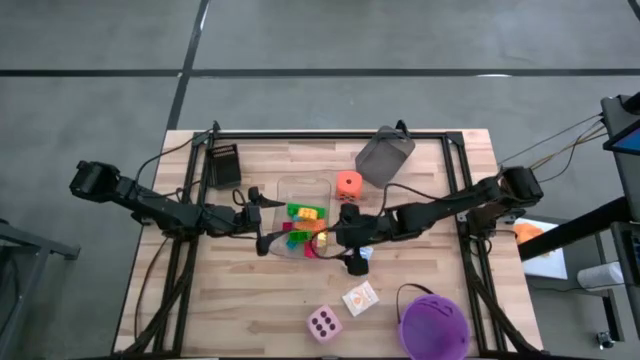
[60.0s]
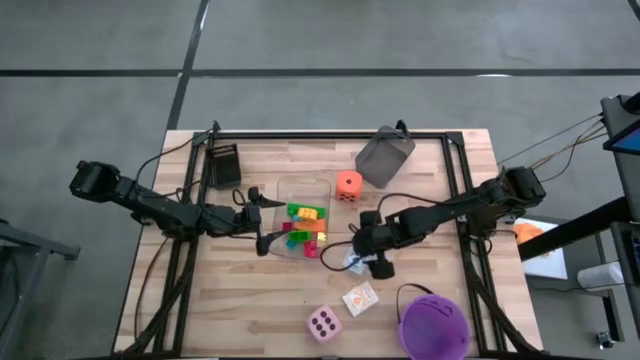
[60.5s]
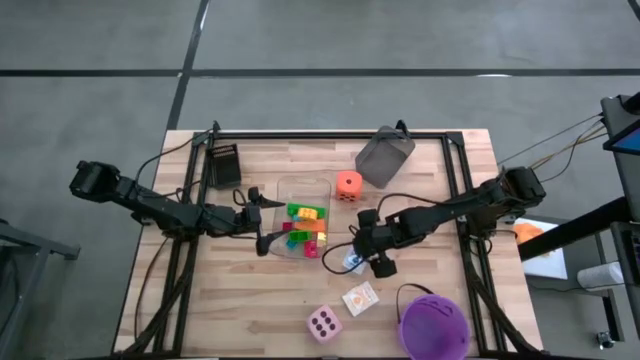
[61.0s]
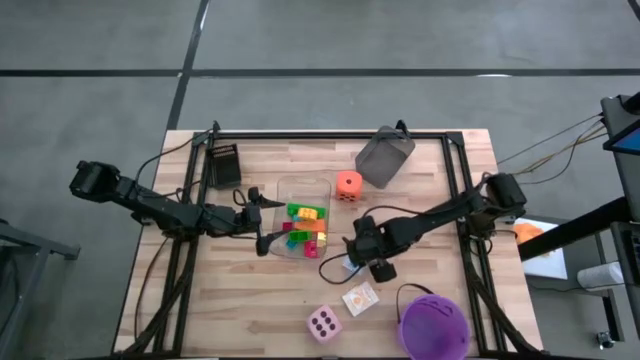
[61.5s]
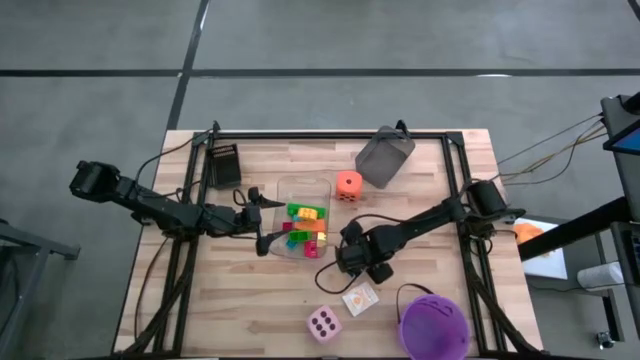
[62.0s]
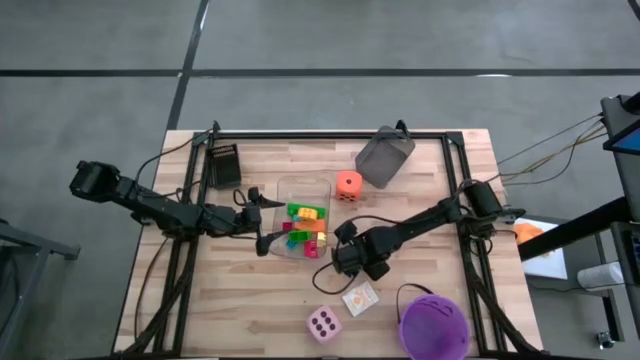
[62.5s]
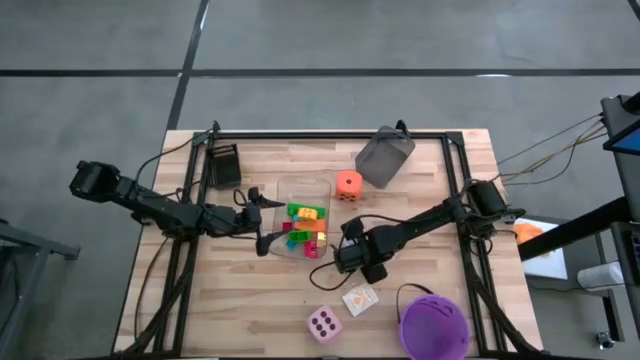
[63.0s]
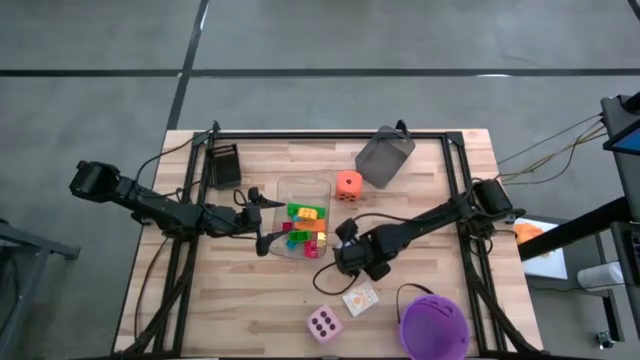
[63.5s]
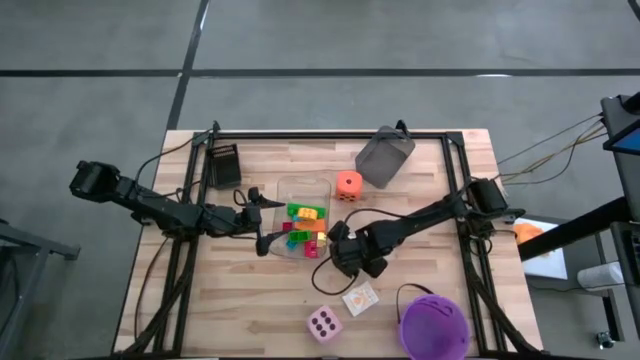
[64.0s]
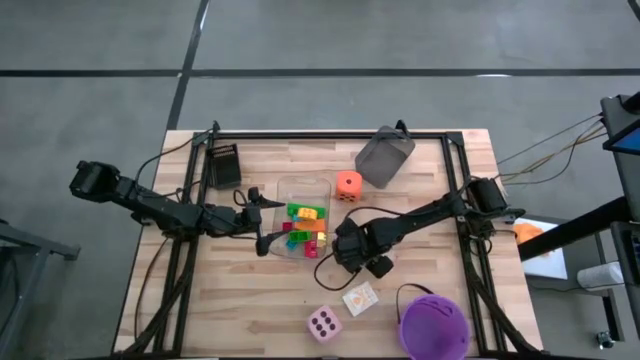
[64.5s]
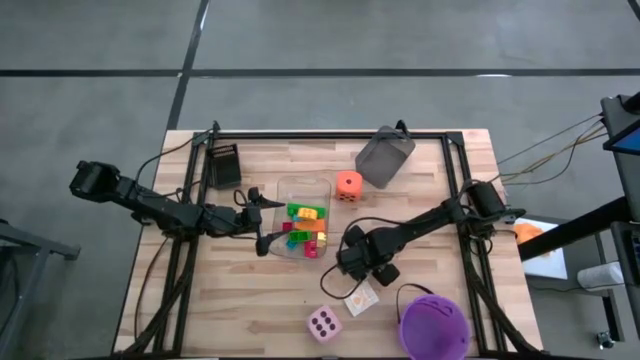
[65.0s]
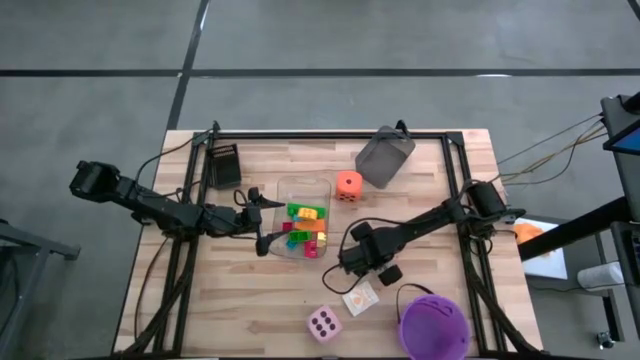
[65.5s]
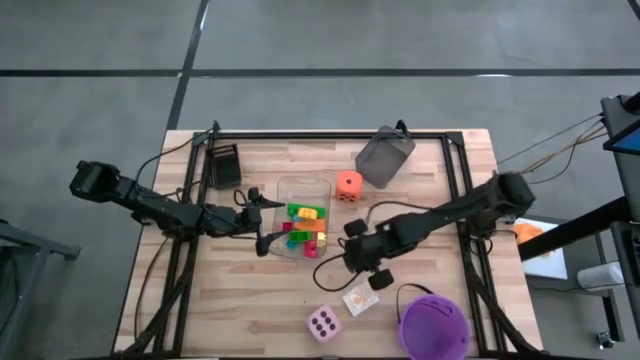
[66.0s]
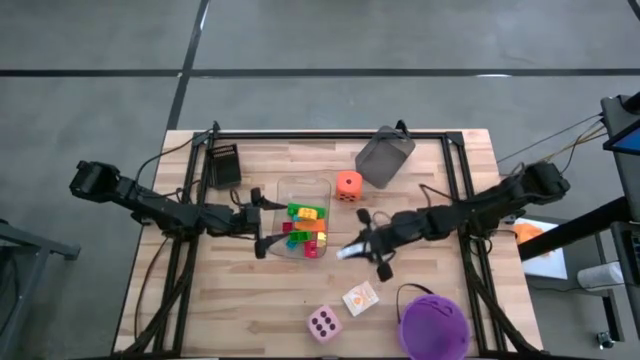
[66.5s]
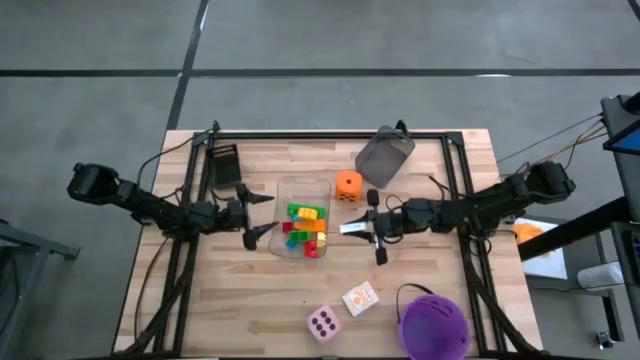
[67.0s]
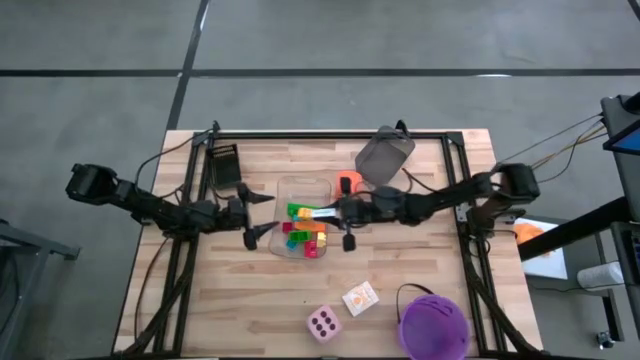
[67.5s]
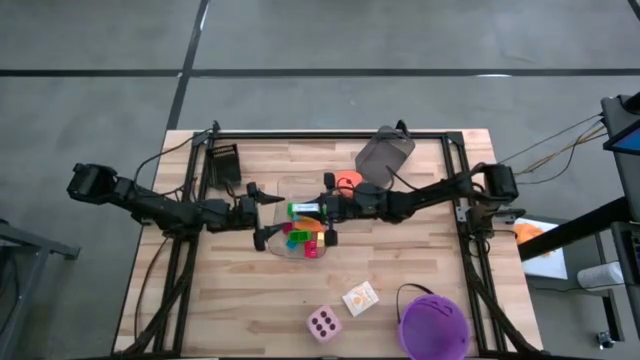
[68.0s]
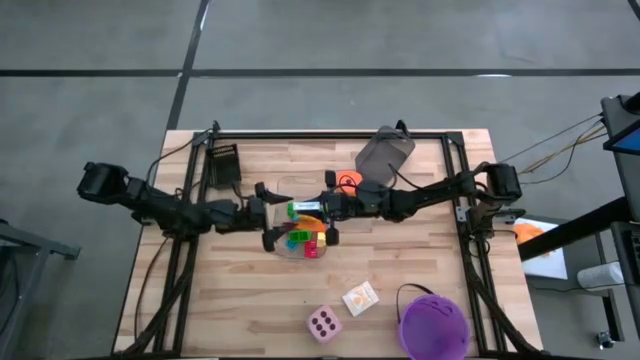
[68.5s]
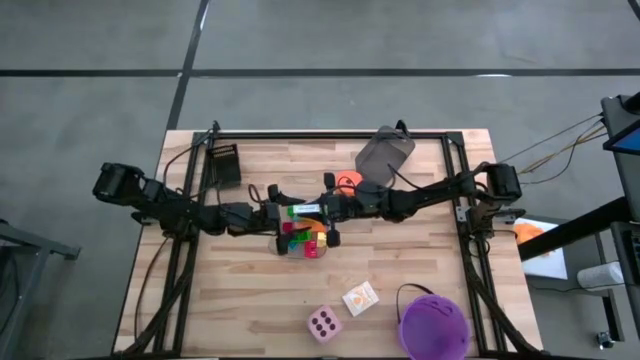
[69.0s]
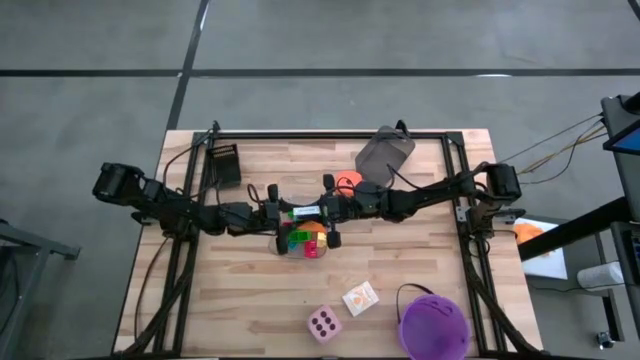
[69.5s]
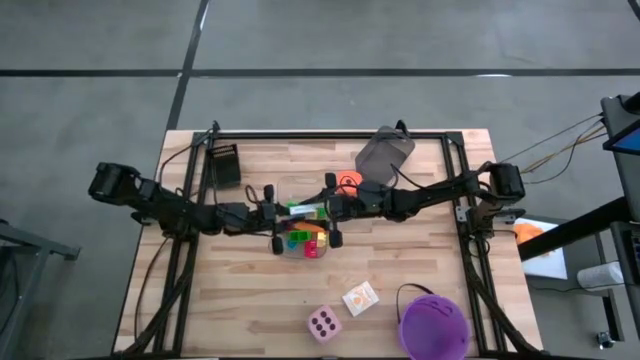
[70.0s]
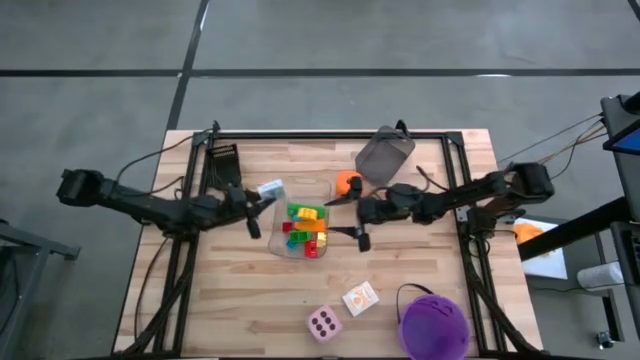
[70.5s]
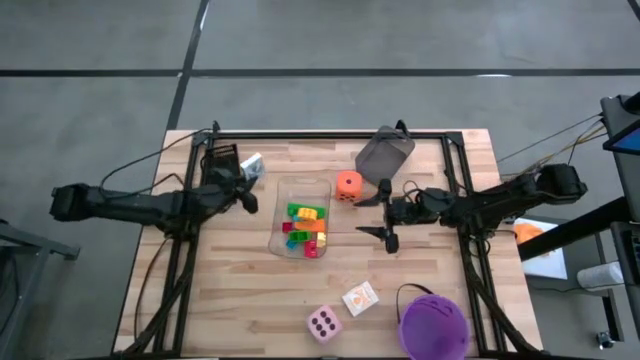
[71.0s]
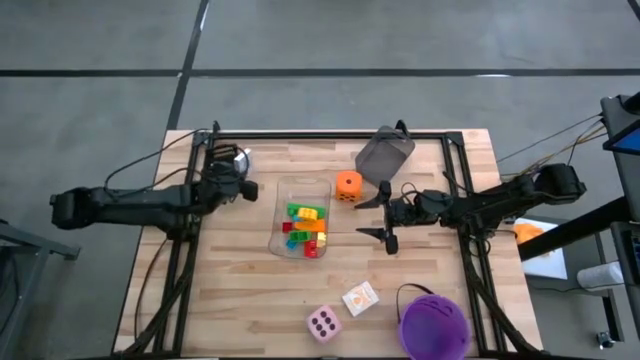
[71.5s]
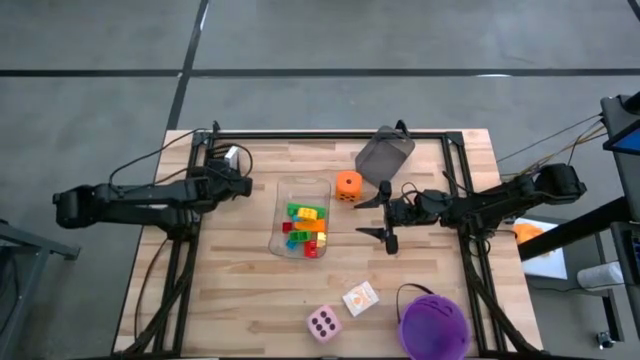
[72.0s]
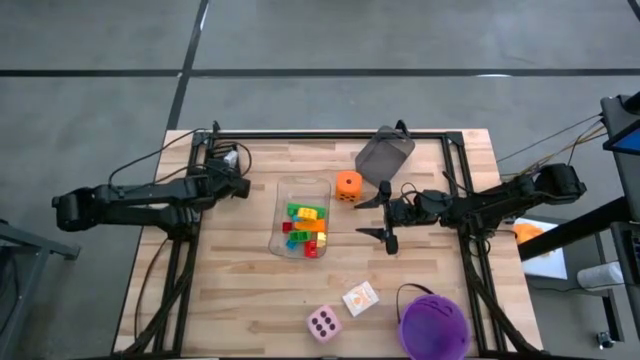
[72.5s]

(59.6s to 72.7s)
Task: Pick & Place Toys
Put the blue deck of cards into the black basket

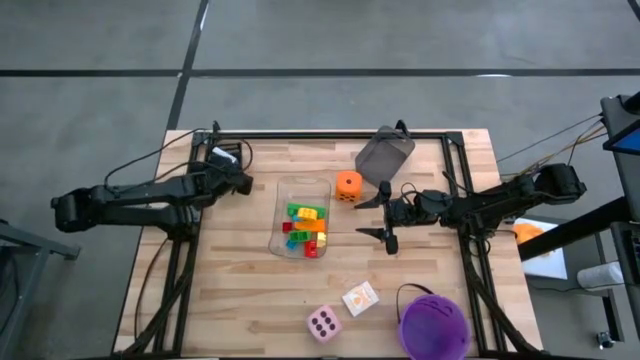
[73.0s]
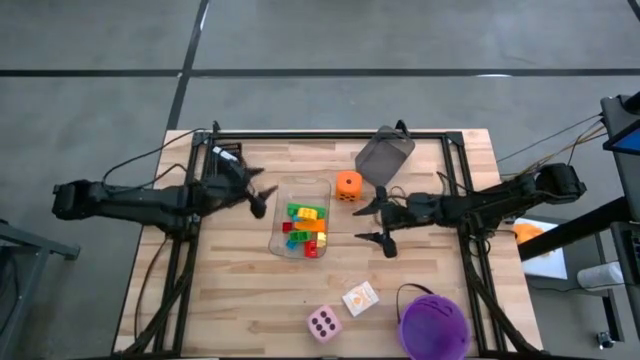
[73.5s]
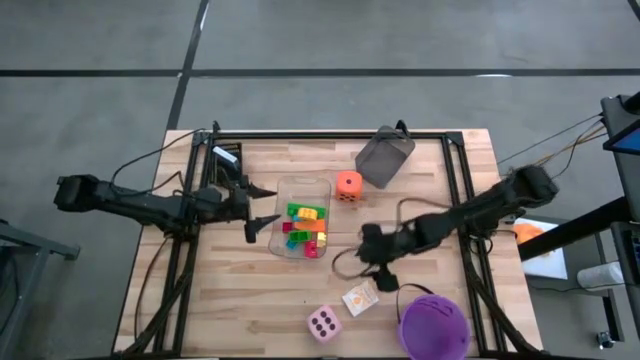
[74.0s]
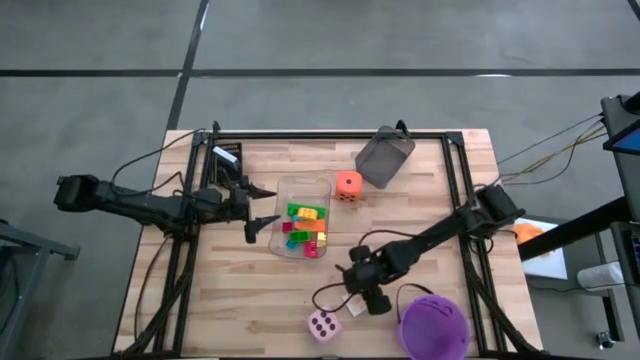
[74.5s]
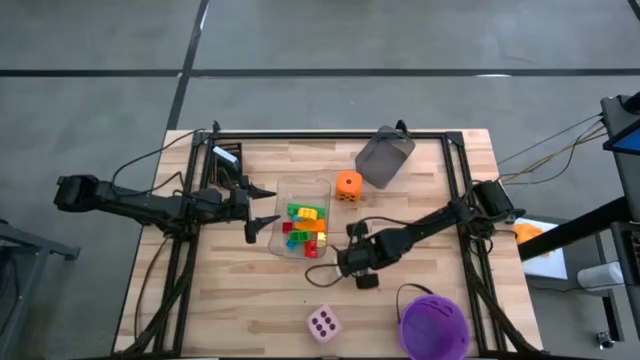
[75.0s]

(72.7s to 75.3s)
Put the orange deck of cards into the black basket

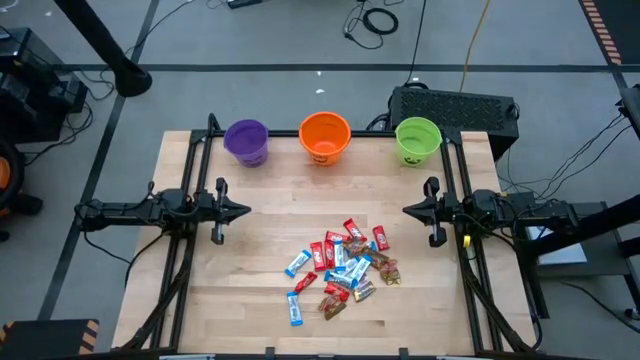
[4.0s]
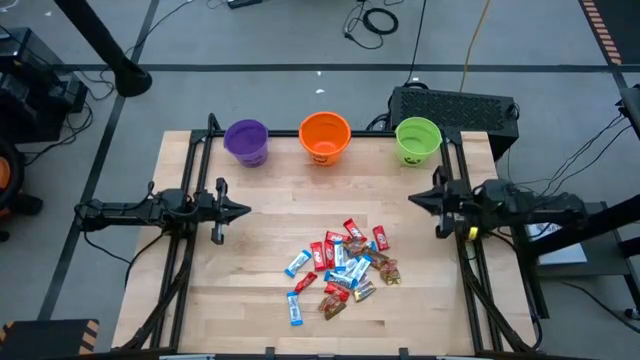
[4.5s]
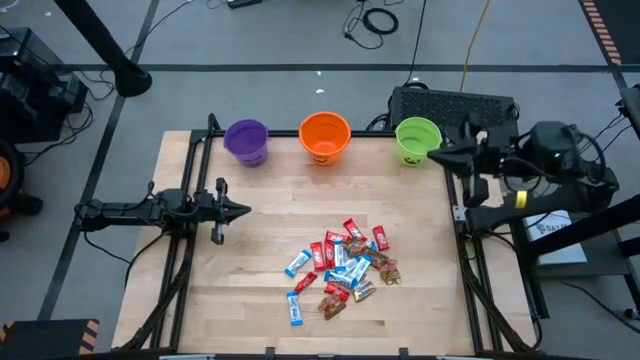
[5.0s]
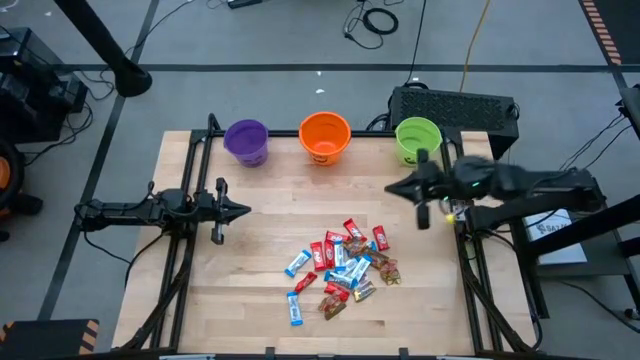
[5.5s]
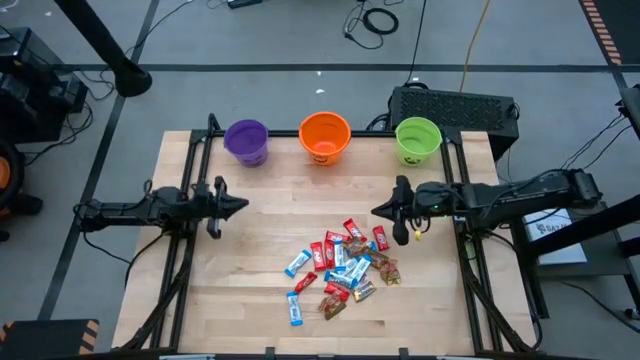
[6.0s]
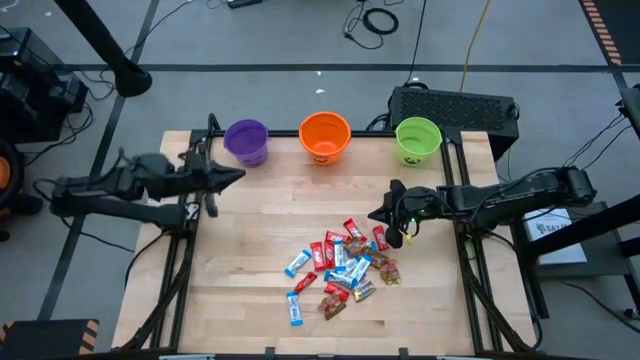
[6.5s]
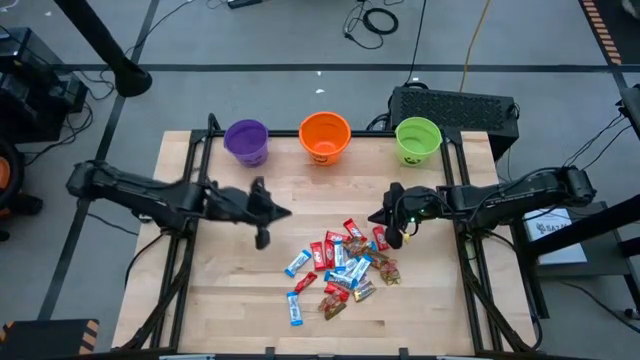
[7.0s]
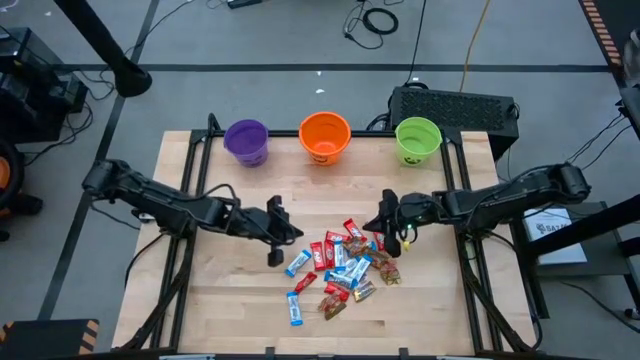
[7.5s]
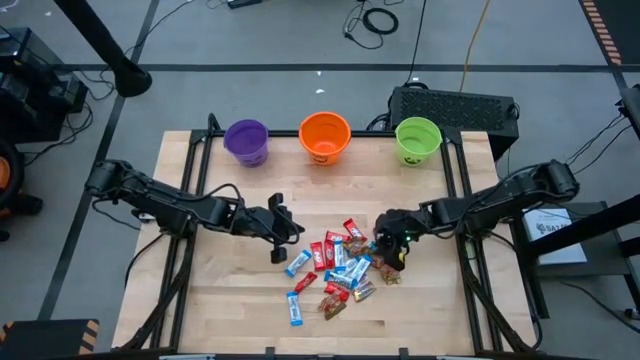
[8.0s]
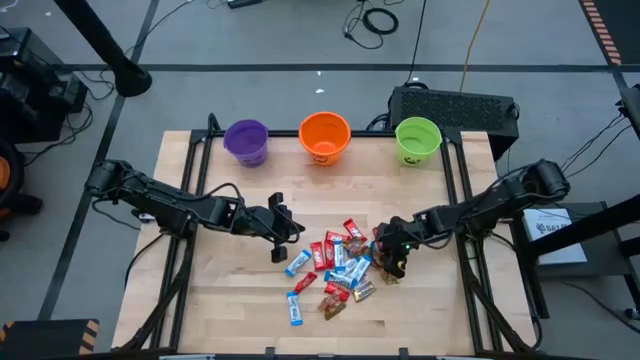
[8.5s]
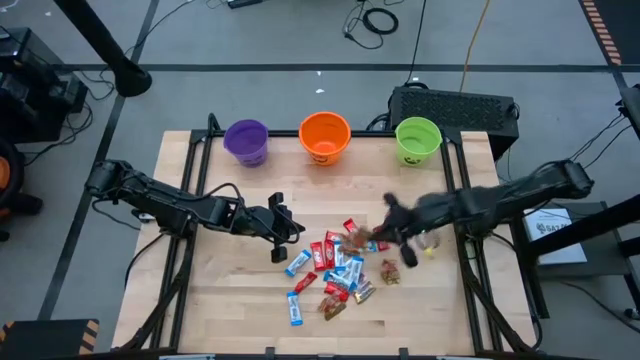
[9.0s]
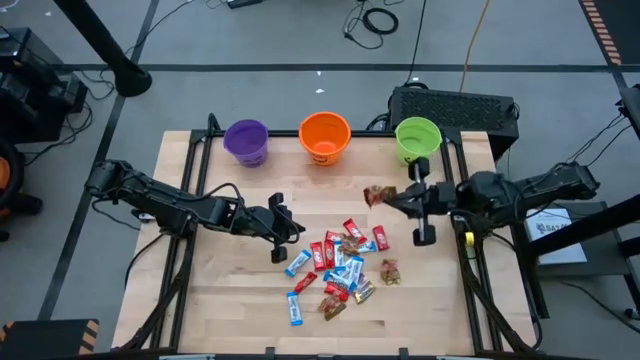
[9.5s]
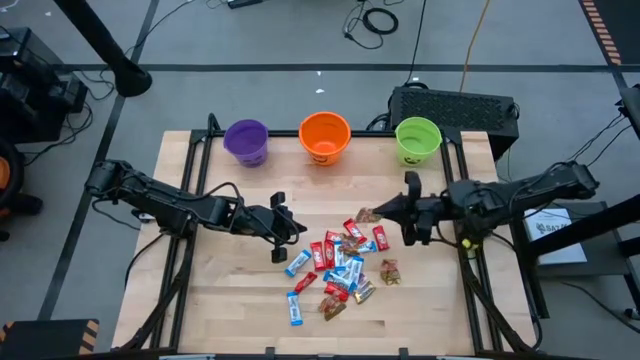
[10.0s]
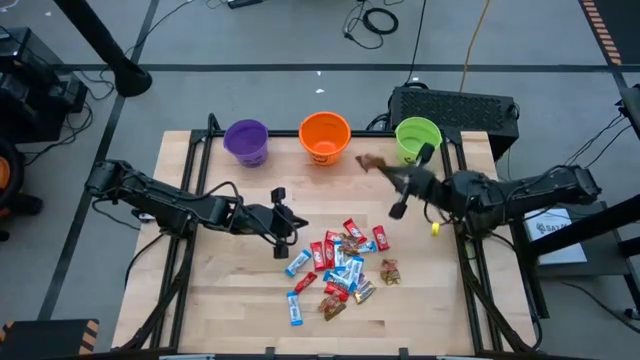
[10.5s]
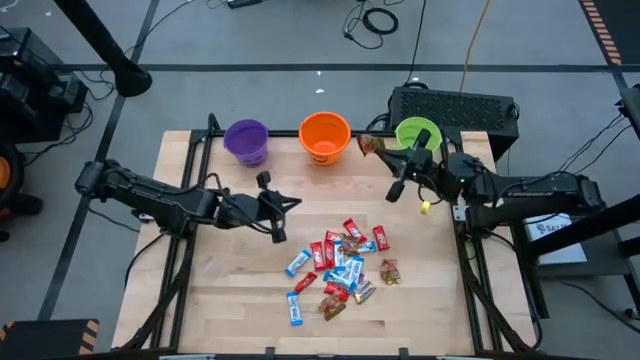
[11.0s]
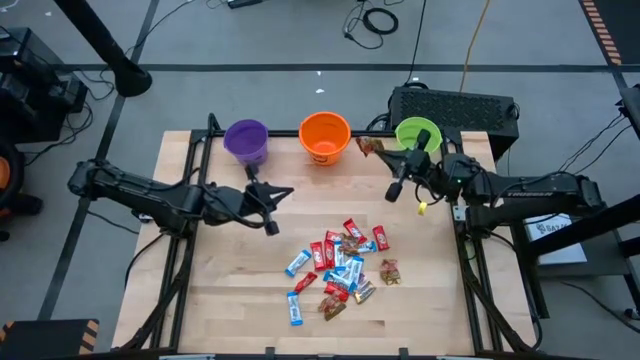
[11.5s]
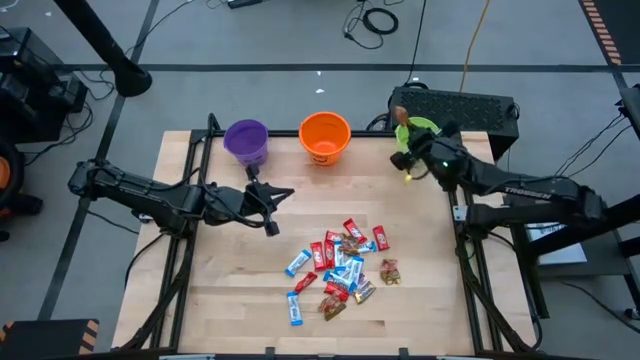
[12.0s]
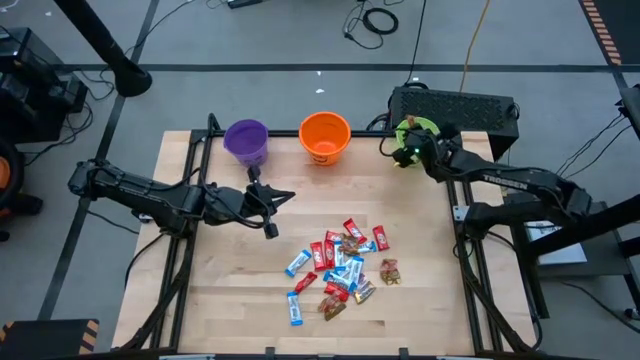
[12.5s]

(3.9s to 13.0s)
Task: Sort candy by brand, put in halloween buckets
Put the brown gummy into the green bucket
